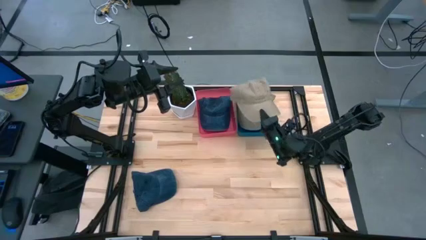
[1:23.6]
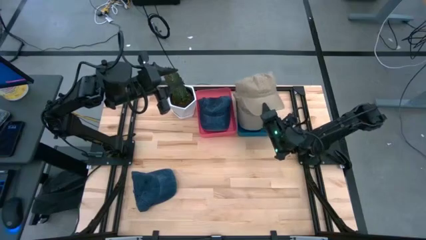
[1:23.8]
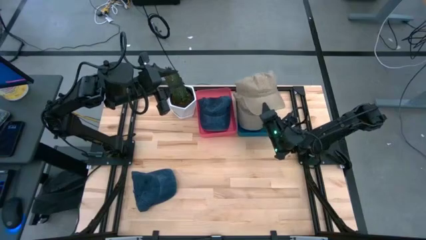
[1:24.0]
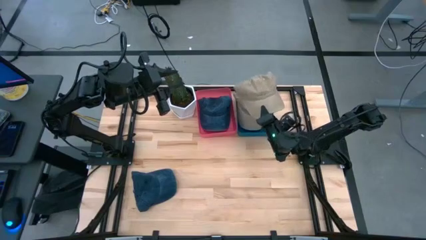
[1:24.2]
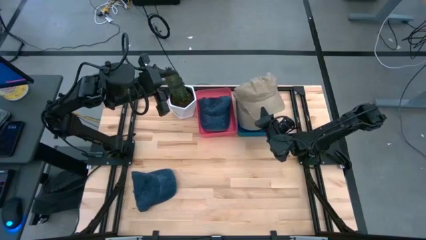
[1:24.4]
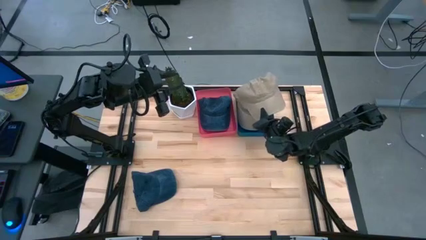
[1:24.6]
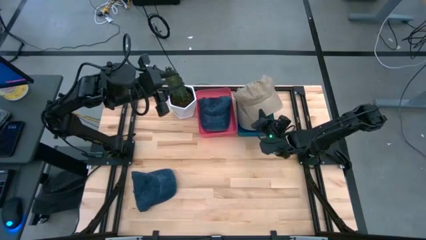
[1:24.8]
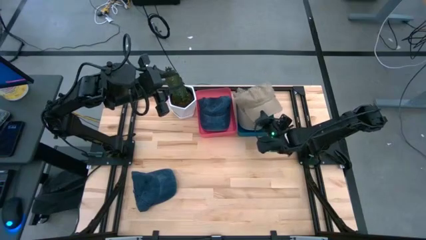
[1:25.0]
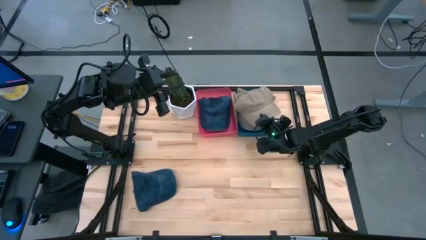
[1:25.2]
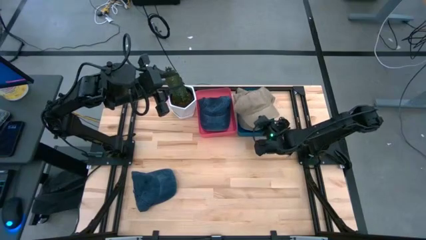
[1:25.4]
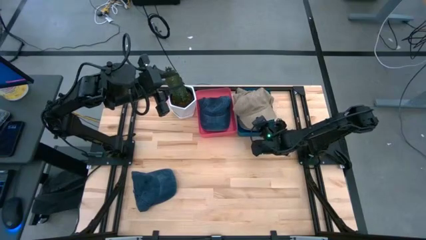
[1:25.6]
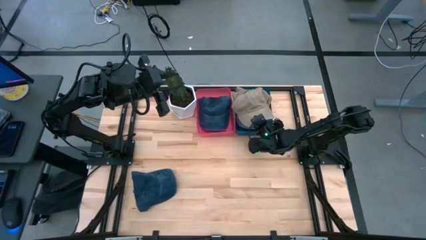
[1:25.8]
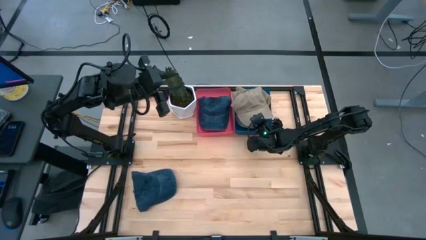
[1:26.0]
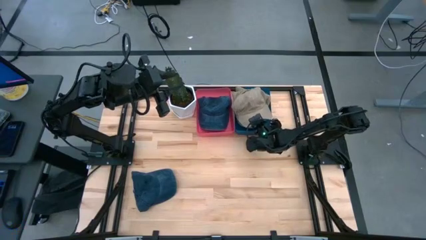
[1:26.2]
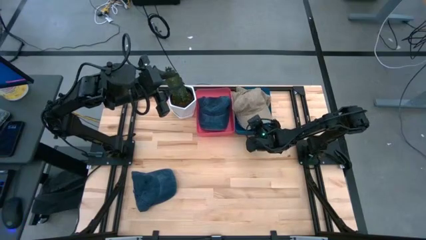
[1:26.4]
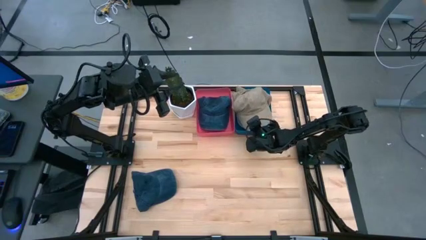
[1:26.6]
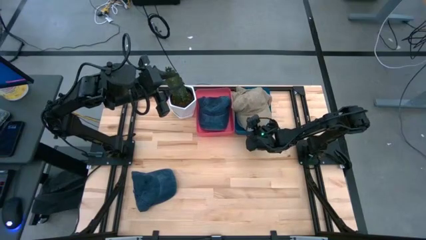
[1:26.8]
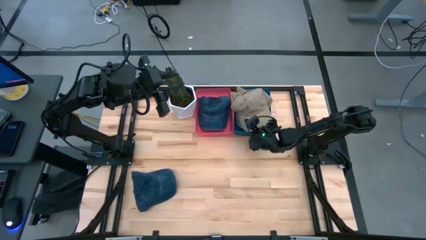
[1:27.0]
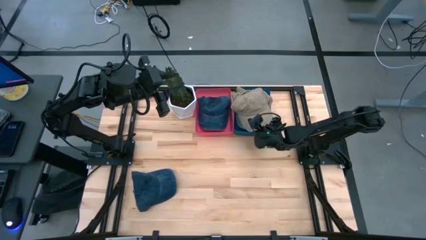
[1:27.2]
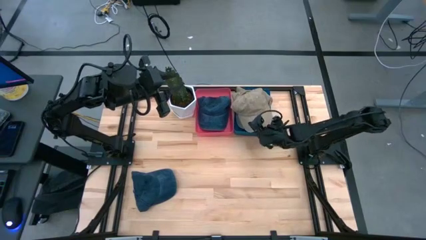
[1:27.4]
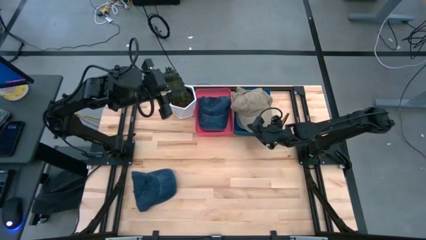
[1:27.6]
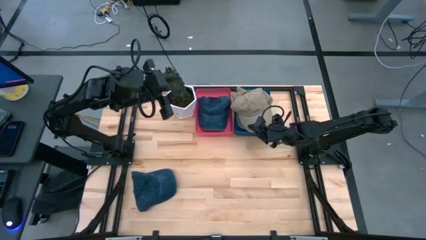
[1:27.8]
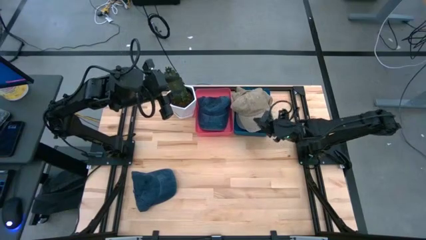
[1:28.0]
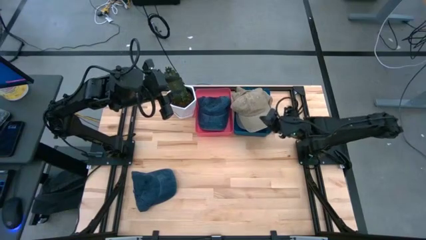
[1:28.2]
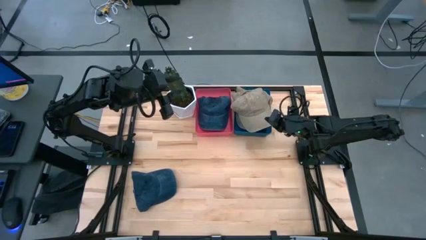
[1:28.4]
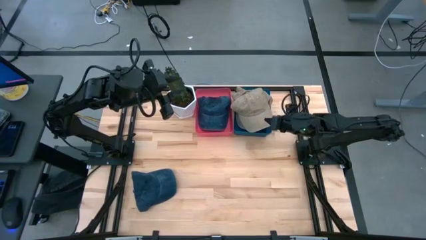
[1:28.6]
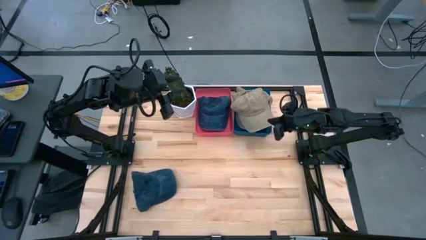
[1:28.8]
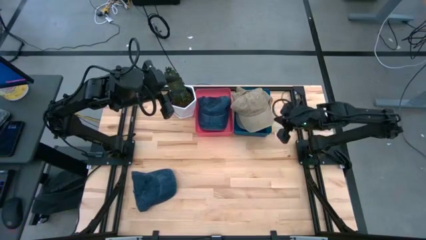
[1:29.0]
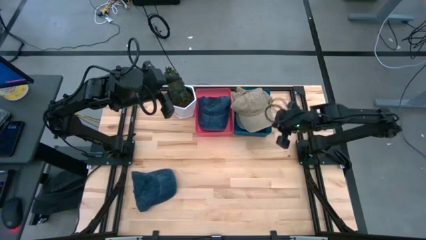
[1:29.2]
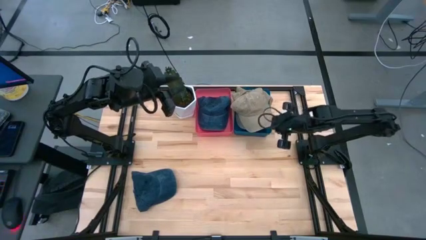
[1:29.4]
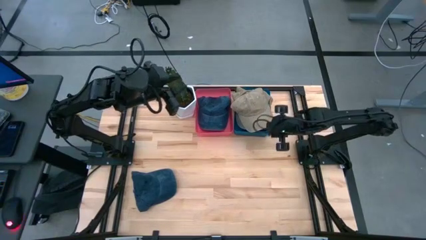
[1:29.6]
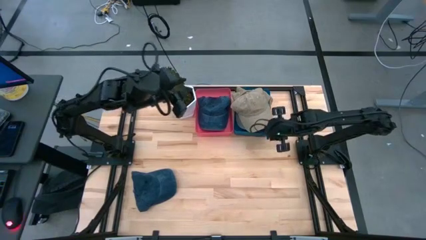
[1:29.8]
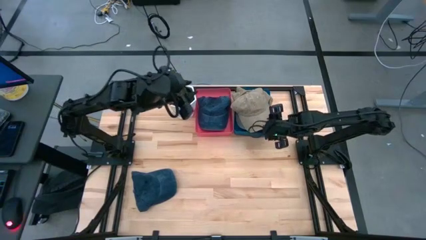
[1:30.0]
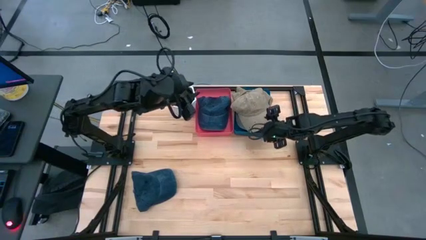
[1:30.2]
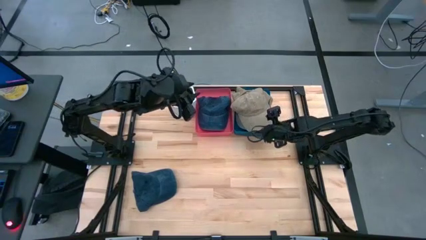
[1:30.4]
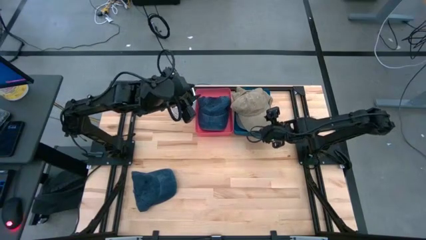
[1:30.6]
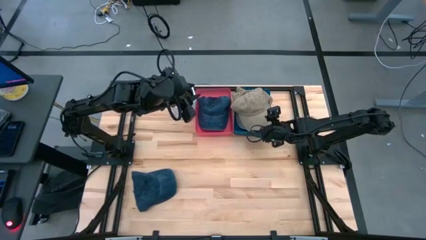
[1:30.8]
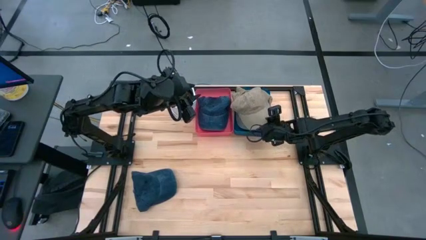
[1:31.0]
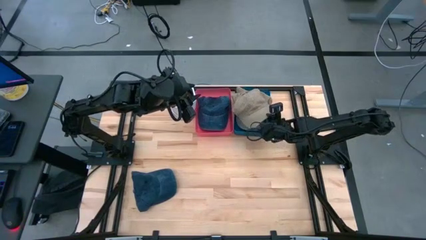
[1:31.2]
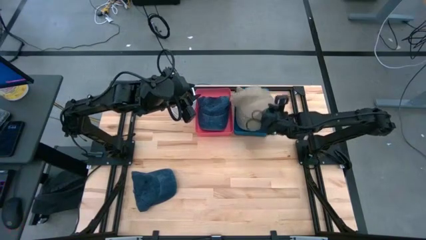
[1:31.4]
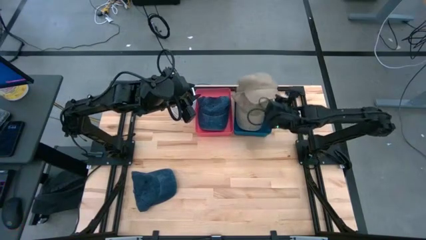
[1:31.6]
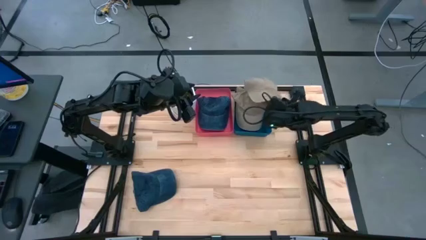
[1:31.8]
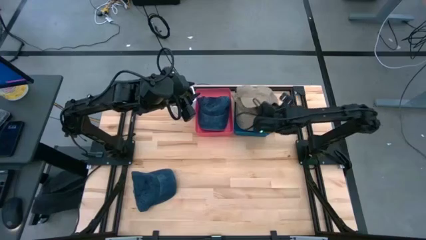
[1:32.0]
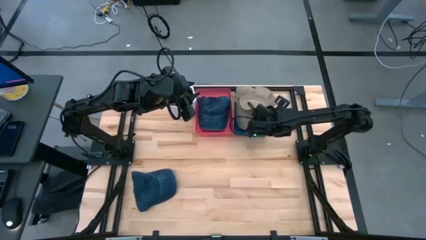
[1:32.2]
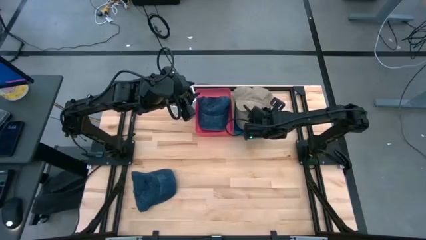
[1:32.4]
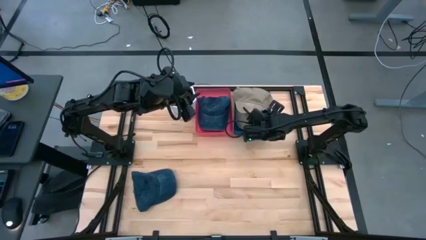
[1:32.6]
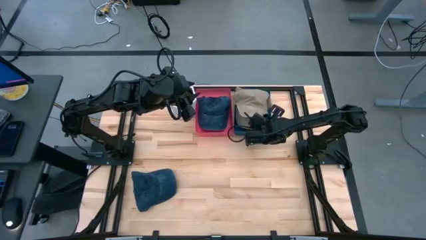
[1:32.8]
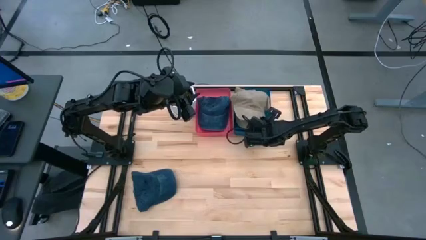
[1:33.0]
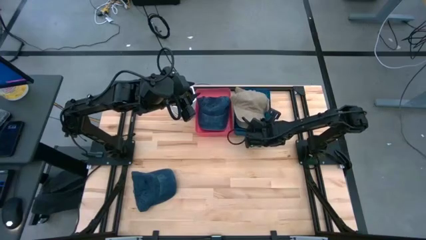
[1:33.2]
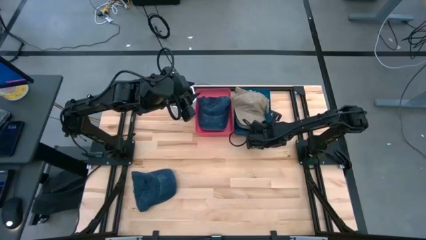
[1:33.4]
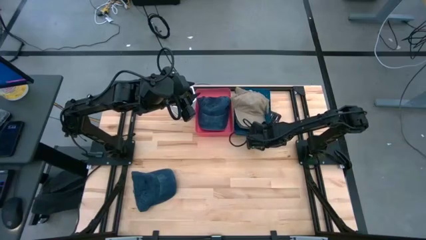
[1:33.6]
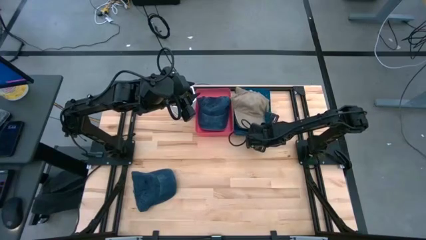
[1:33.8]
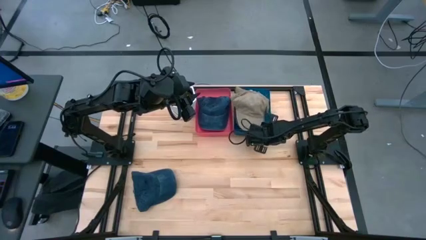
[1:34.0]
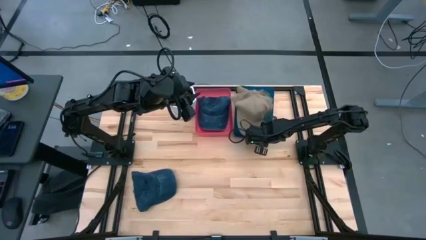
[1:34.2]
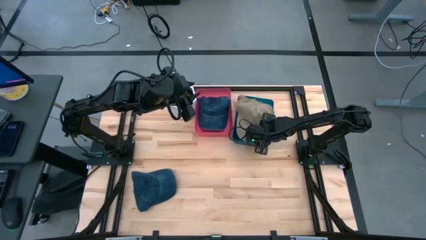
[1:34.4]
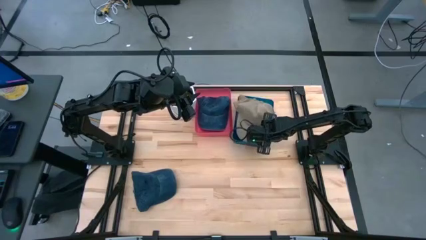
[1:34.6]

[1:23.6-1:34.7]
Task: Pick & Place hat
Put the brown cap into the blue bin

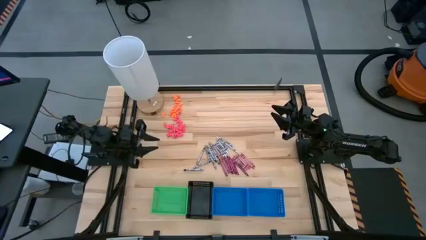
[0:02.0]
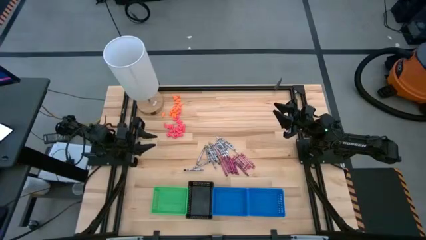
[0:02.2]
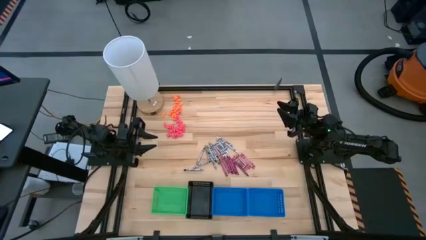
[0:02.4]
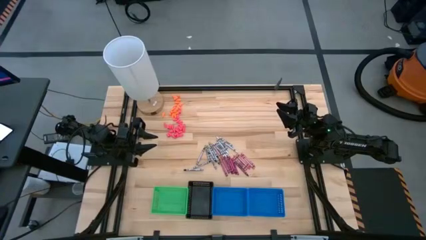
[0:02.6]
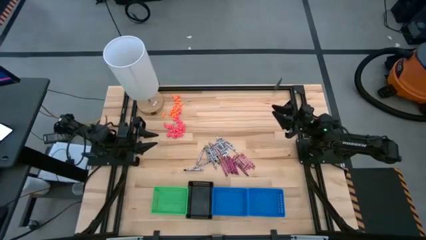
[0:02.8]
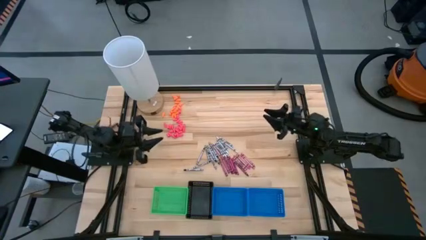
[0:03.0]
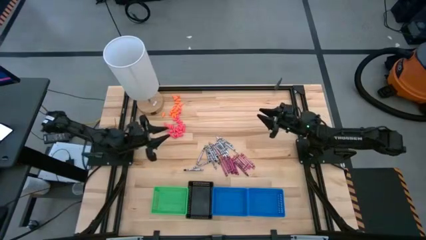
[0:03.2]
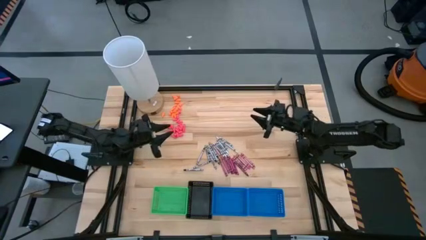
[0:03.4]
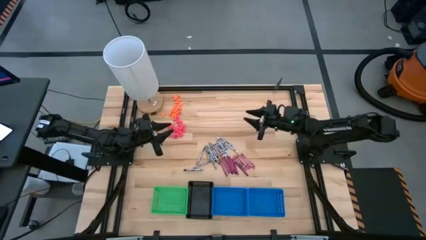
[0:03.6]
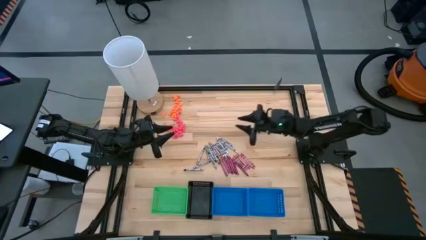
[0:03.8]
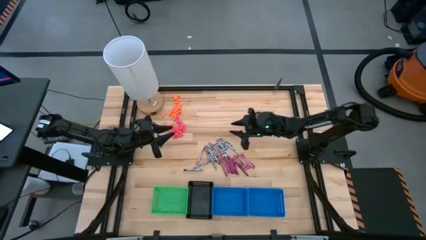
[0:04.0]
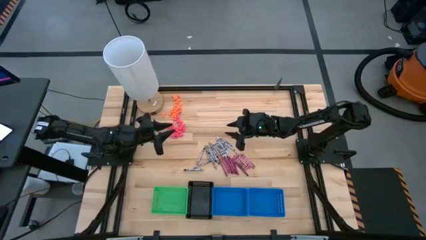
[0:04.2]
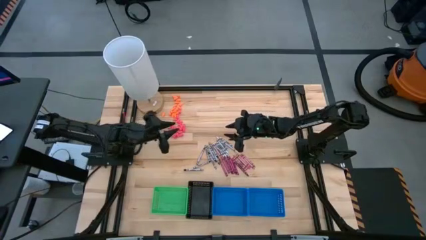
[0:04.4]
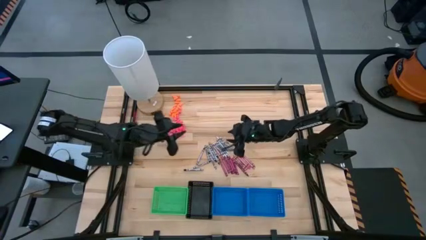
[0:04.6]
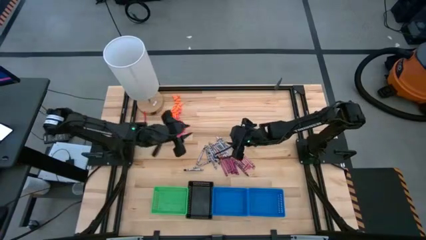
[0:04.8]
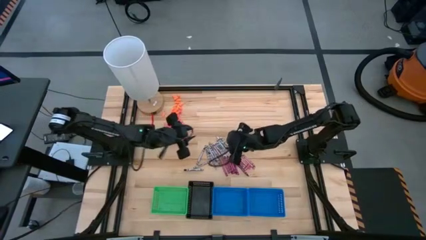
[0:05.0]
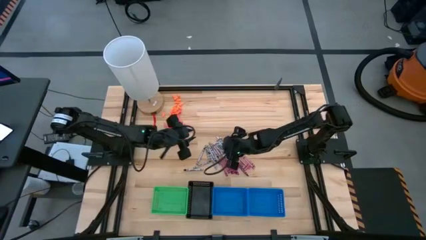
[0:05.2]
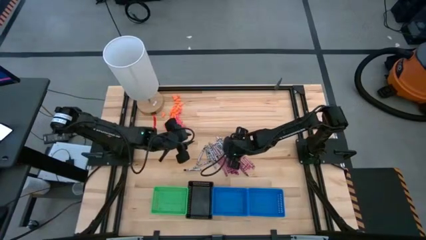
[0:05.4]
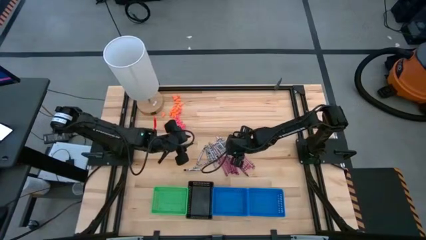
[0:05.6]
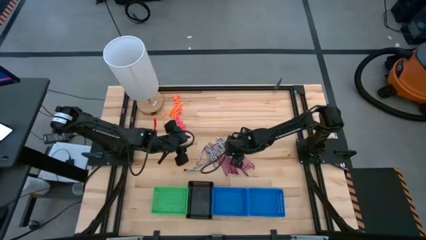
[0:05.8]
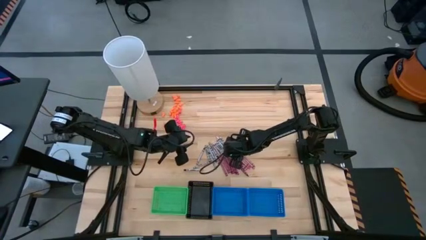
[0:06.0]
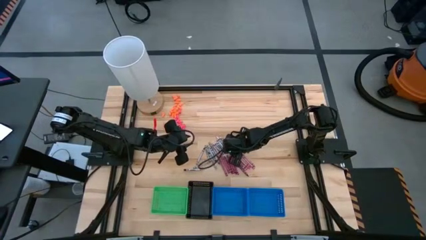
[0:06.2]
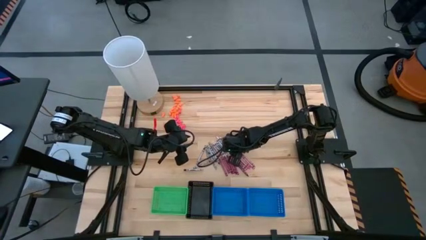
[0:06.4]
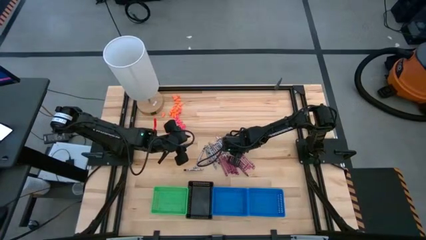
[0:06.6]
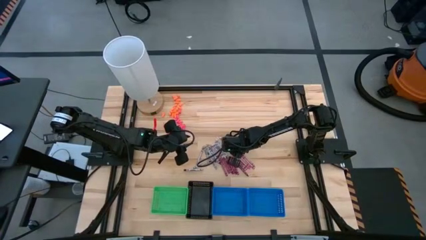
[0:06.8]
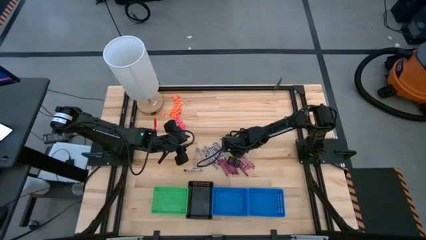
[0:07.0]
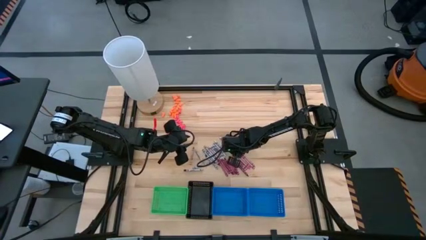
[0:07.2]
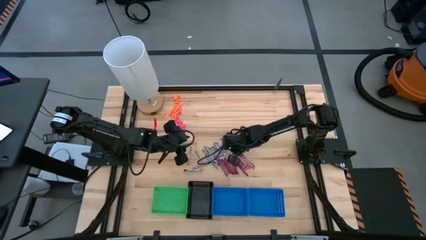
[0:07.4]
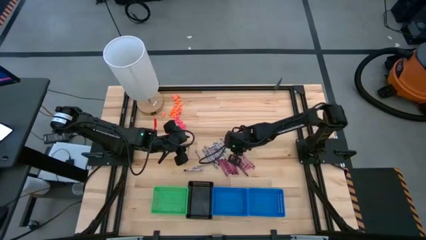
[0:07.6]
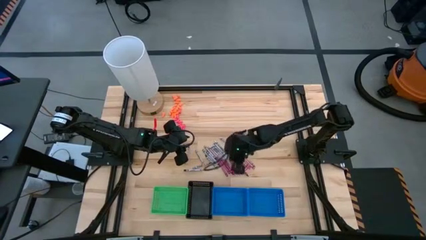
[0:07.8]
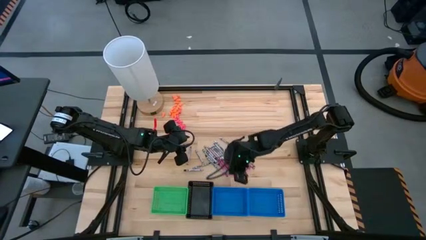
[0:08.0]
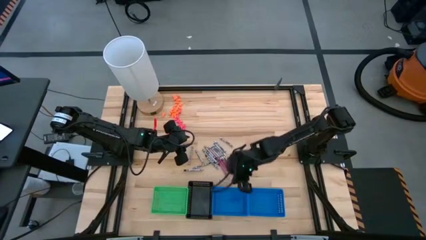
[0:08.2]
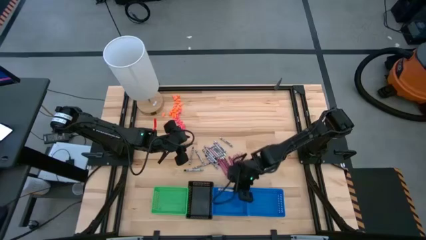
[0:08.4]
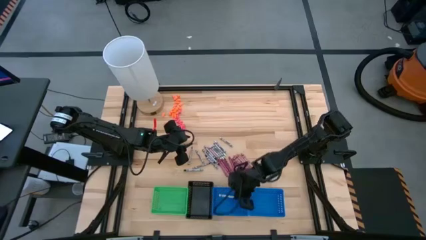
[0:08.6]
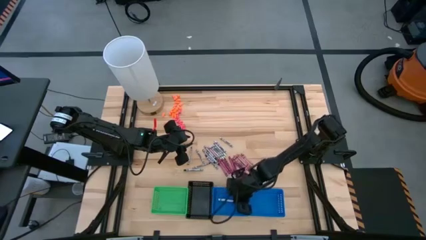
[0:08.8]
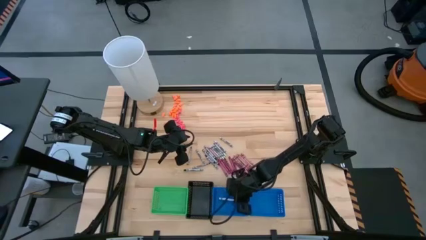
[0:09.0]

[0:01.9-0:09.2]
Task: Sort crayons
Put the white crayon into the left blue bin
